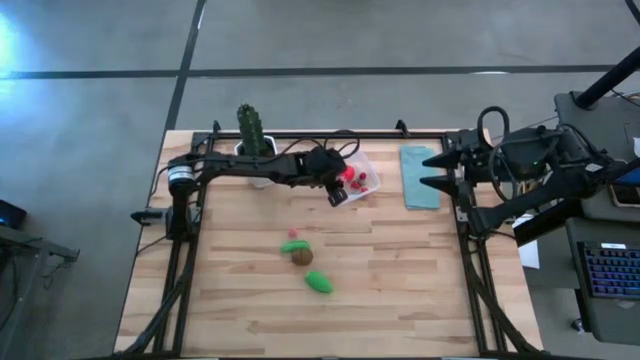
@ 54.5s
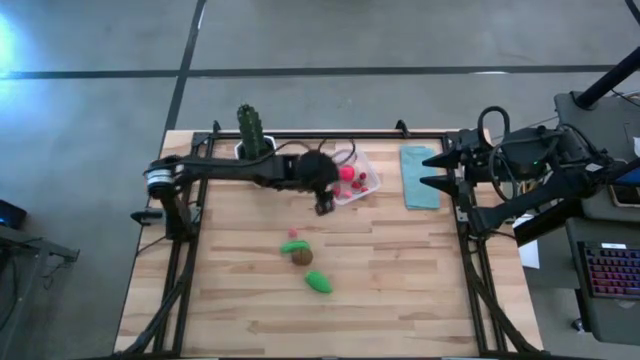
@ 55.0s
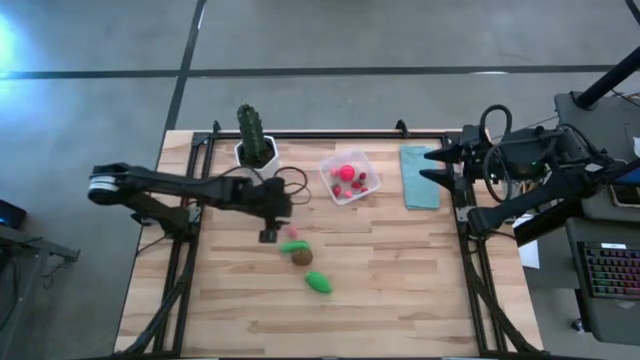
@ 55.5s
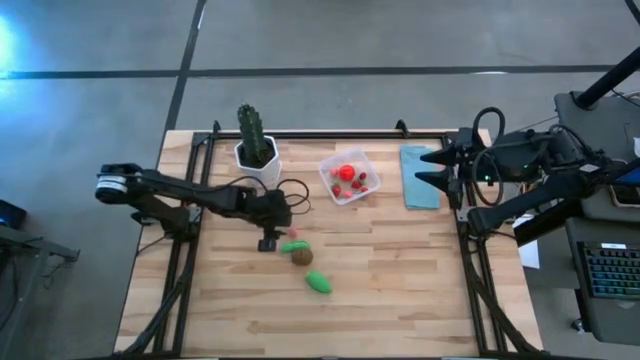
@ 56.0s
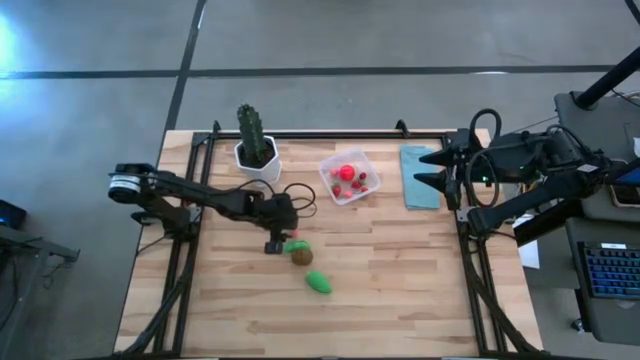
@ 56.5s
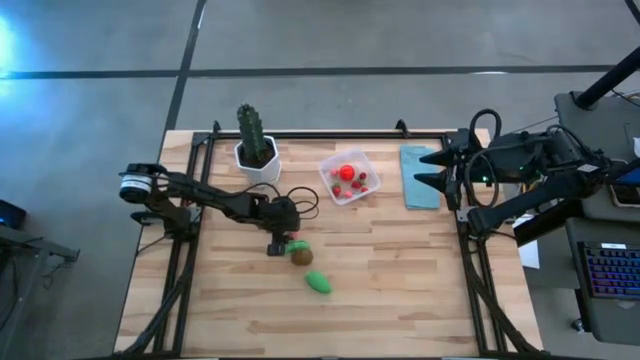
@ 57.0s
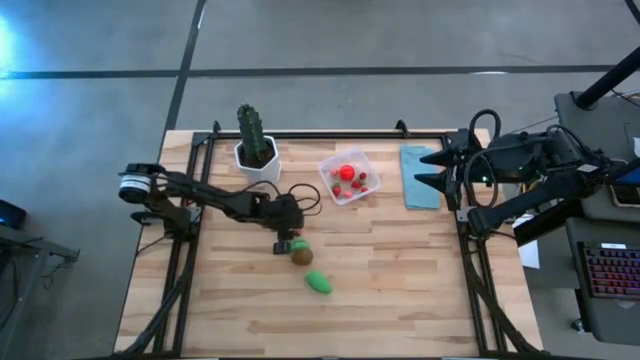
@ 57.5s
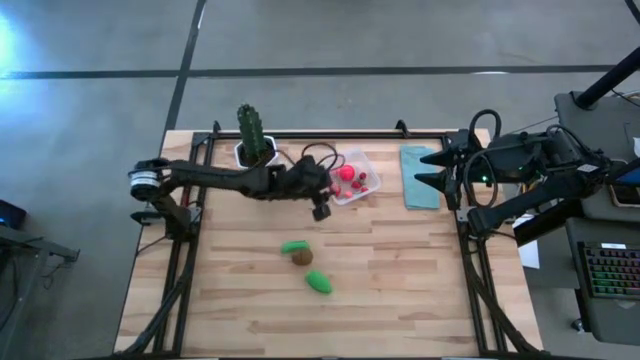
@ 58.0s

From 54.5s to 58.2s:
Task: Pick and placing Produce into tupperware
Put the peach into the transparent bin

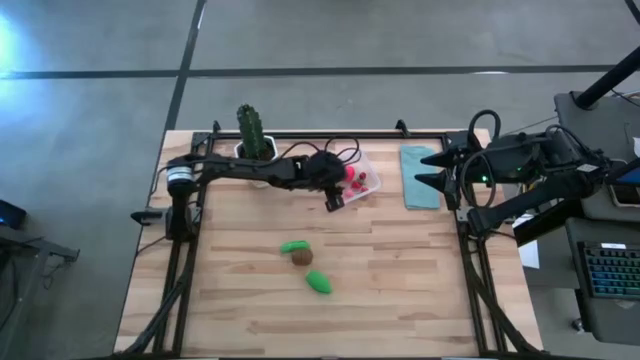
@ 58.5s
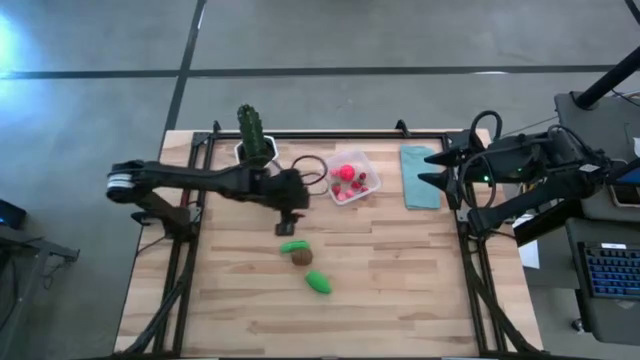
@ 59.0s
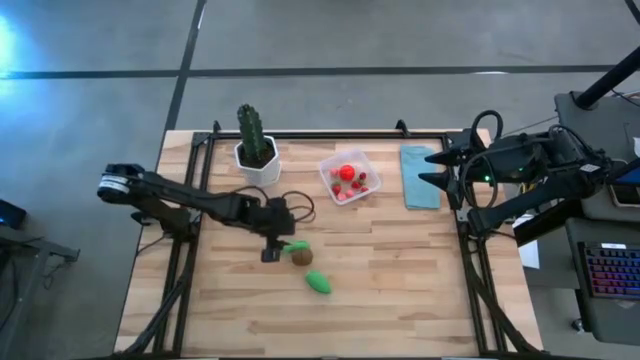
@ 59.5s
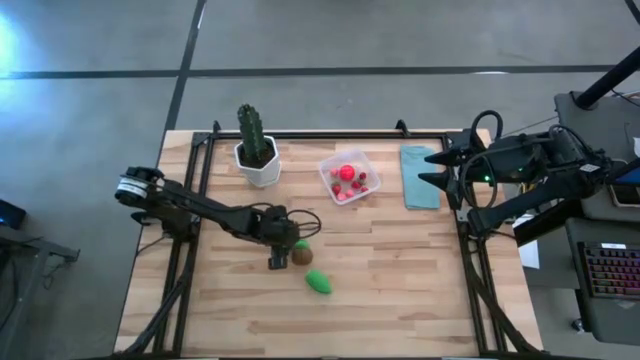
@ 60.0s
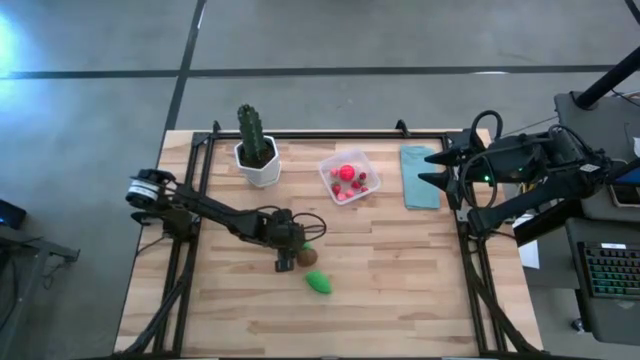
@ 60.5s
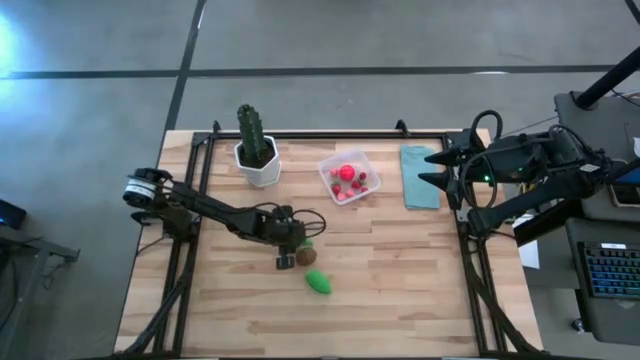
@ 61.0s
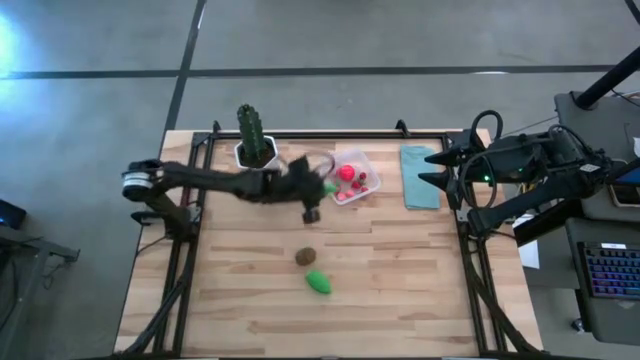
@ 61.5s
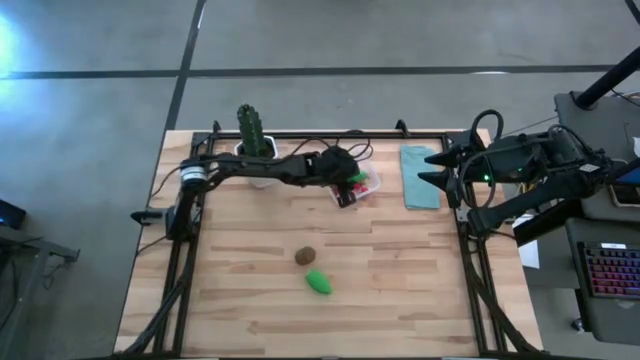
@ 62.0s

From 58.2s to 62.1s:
Put the peas into the transparent bin

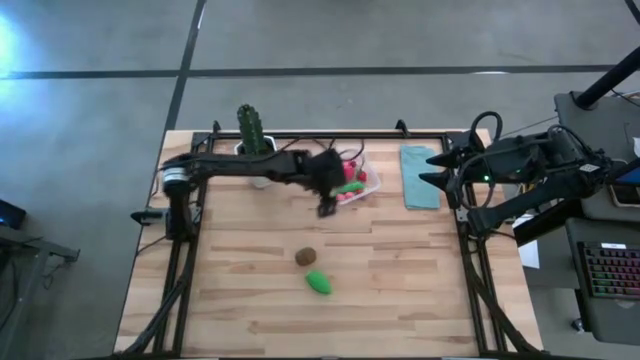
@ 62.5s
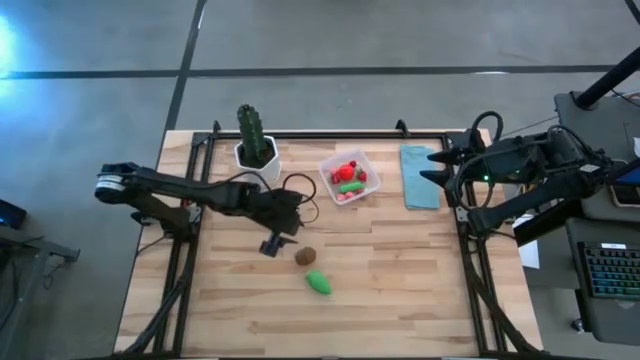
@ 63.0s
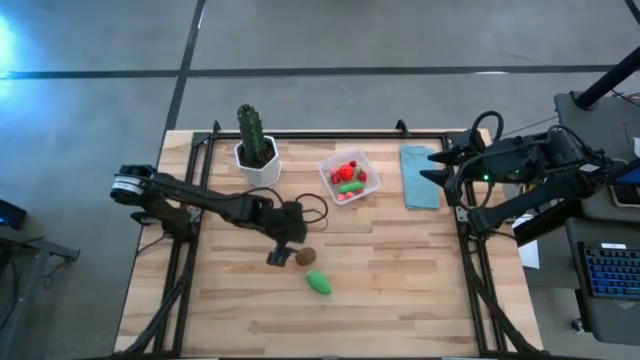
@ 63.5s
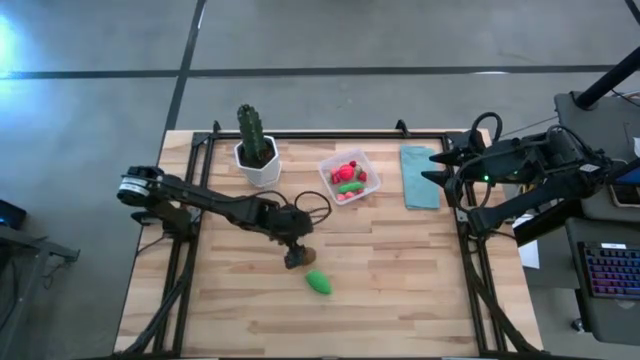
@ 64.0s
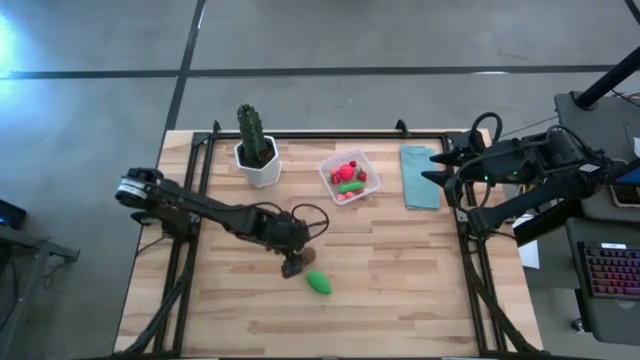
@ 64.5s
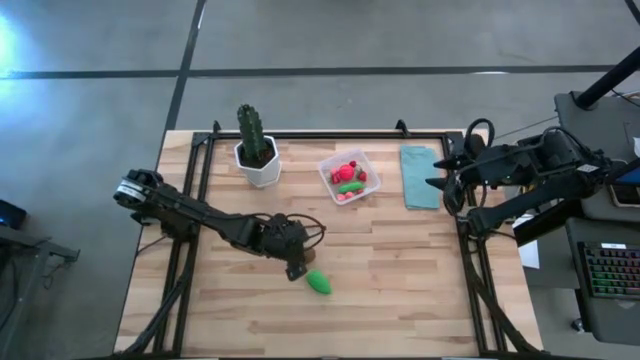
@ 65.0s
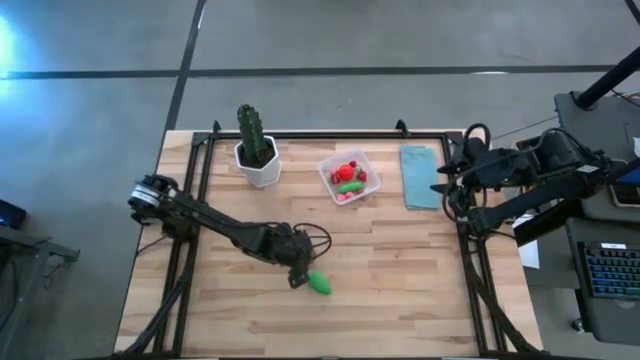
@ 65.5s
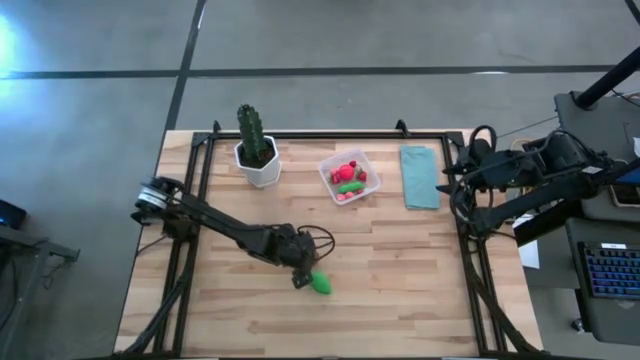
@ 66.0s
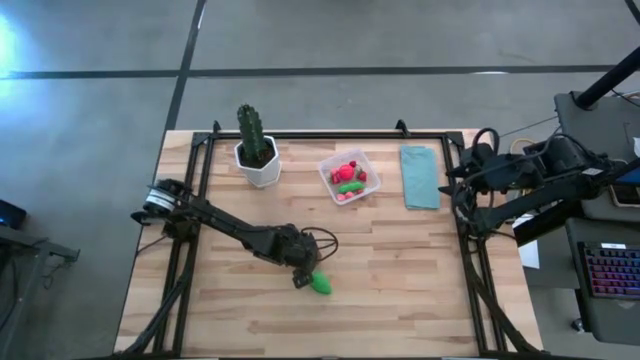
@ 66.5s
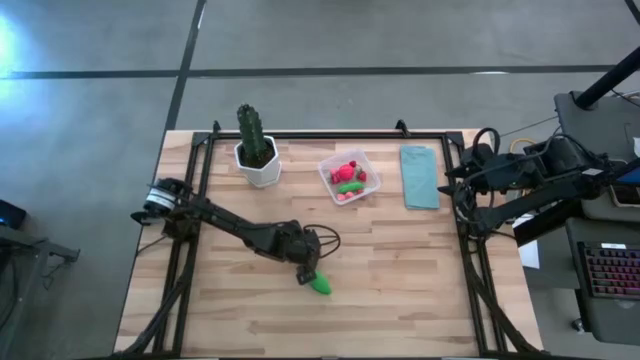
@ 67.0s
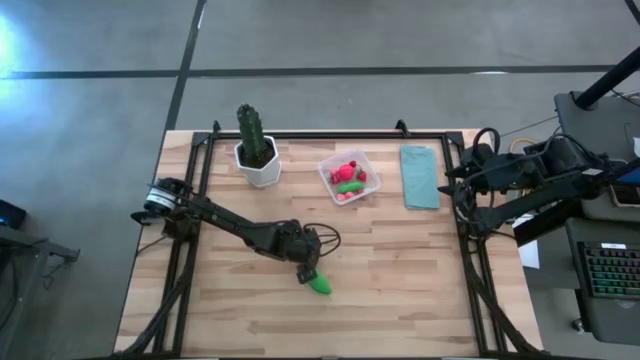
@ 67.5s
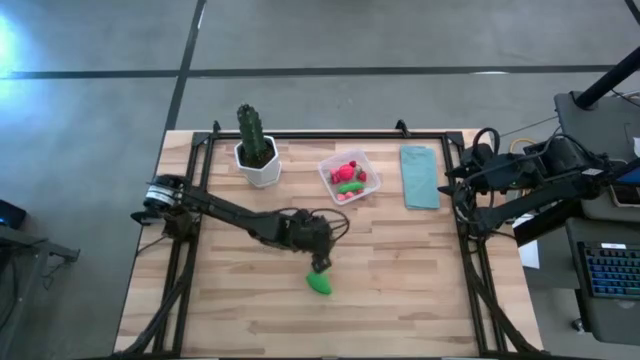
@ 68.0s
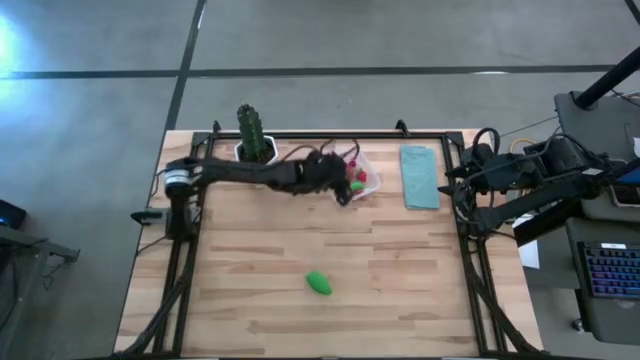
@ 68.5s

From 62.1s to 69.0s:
Put the kiwi into the transparent bin

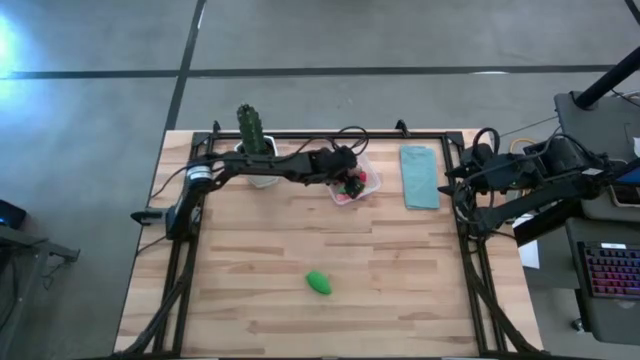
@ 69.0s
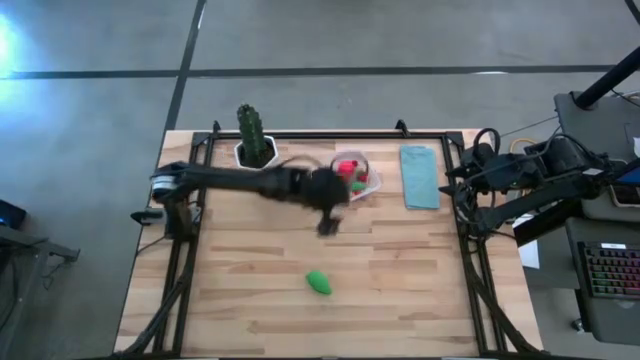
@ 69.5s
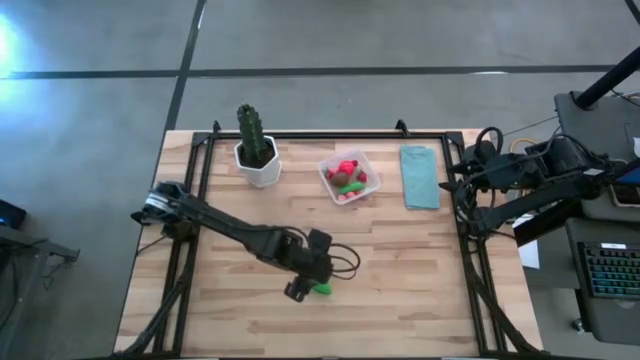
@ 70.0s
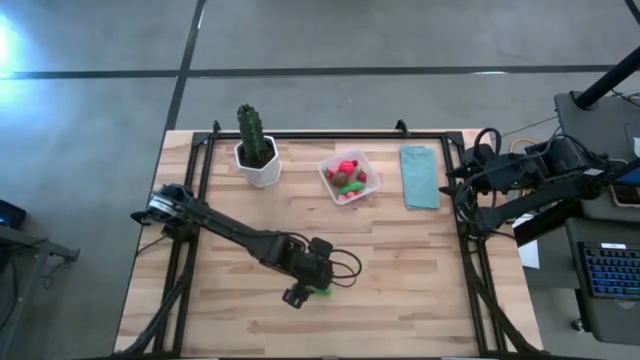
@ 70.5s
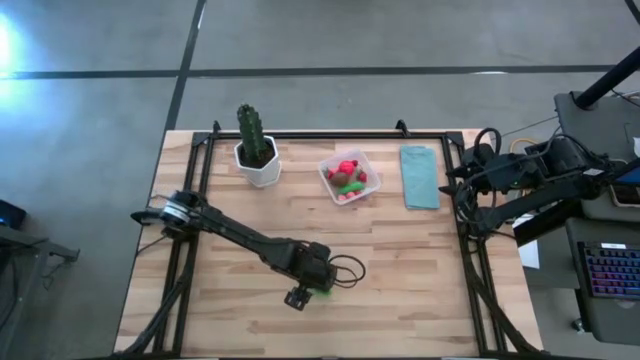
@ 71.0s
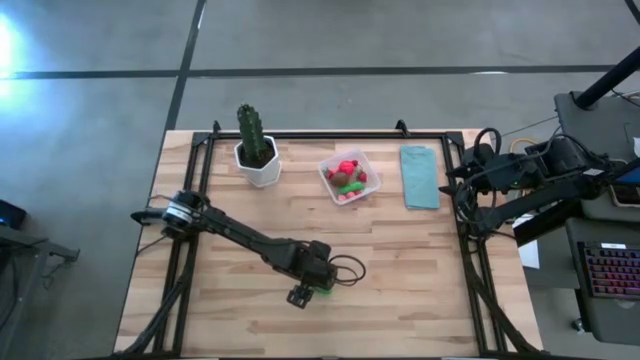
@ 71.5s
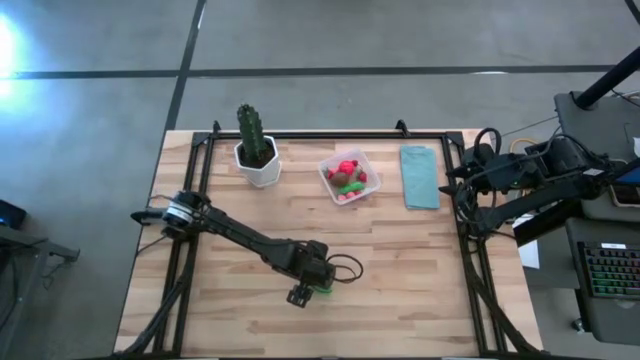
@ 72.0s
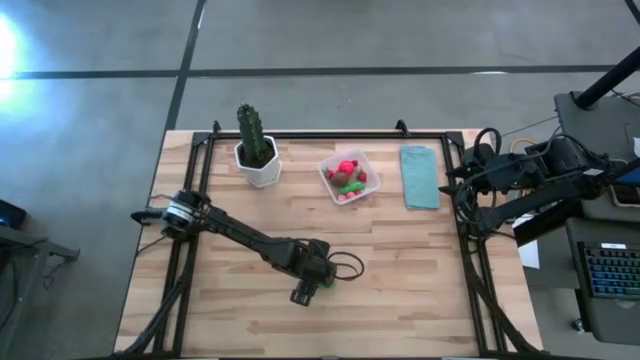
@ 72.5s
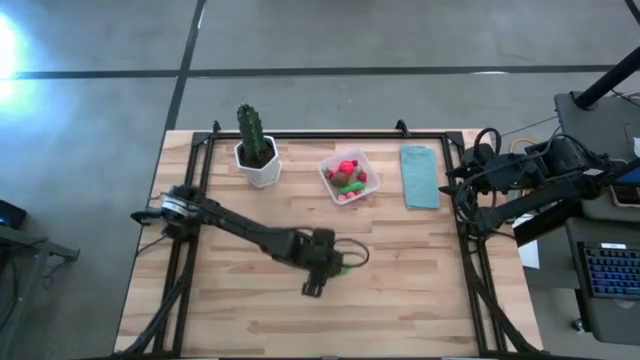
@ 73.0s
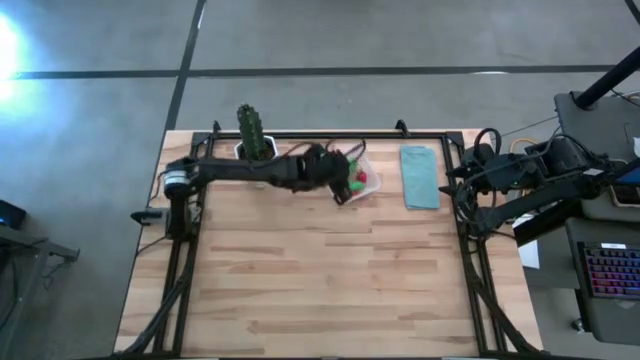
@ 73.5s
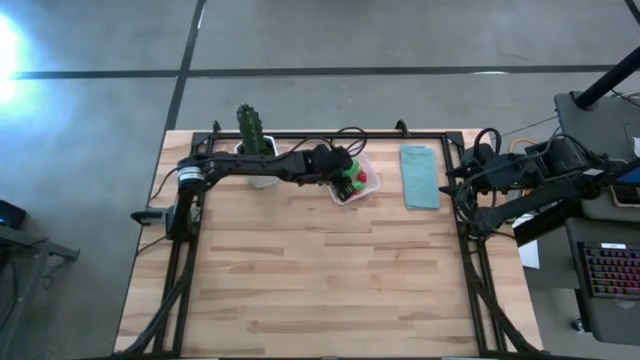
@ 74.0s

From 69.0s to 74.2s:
Put the corn into the transparent bin

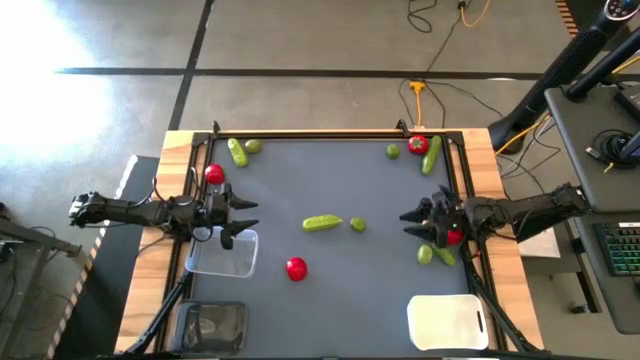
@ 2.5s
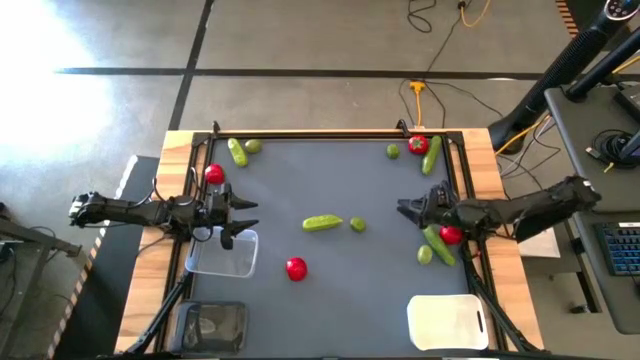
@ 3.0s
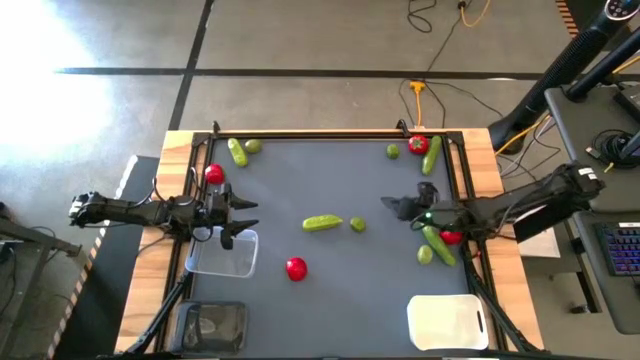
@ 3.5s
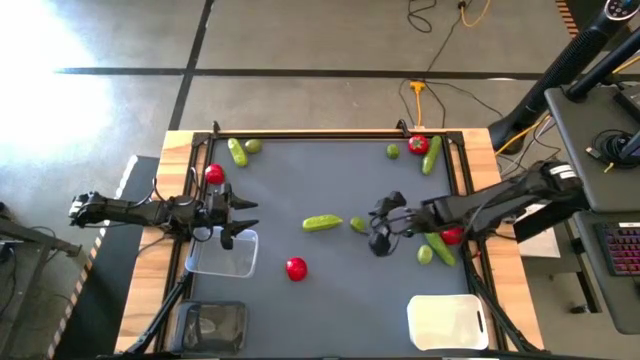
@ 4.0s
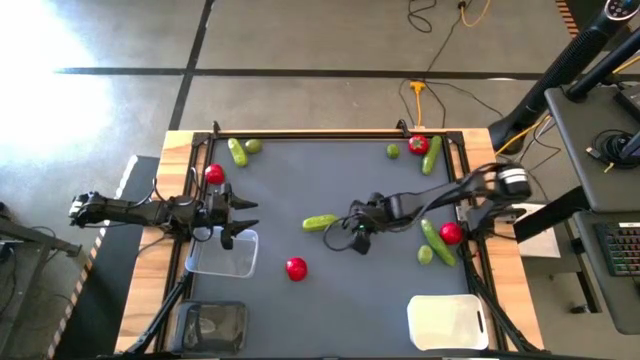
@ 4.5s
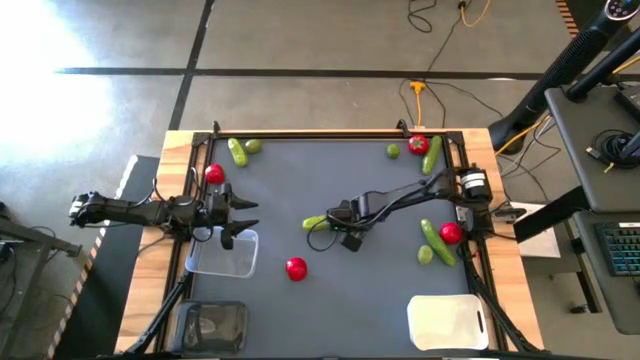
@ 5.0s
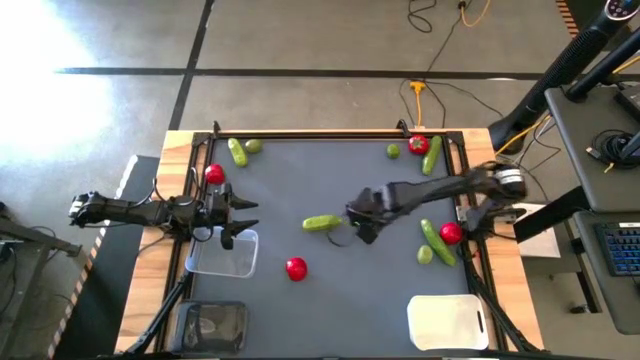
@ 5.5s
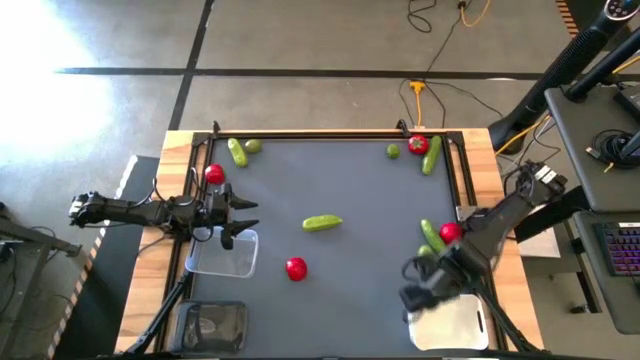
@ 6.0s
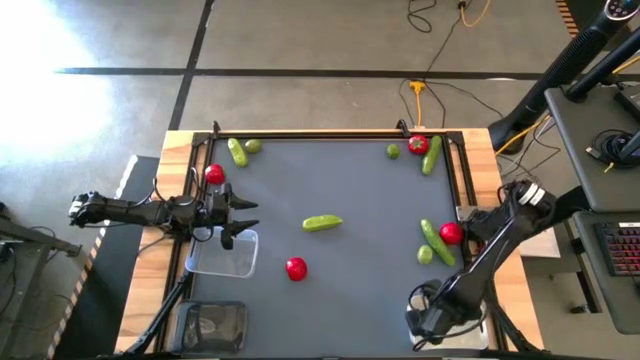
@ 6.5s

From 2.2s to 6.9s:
Task: Sort produce into baskets
Put the middle lime into the white bin
